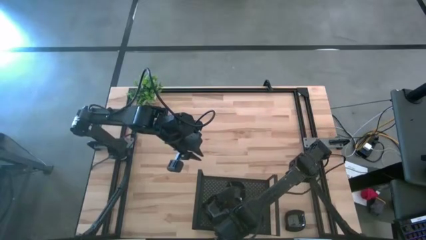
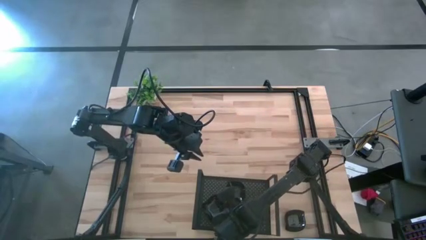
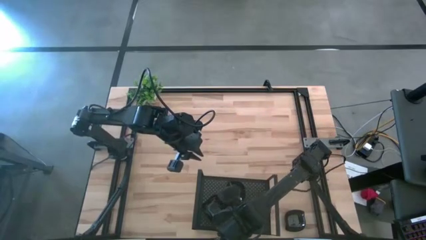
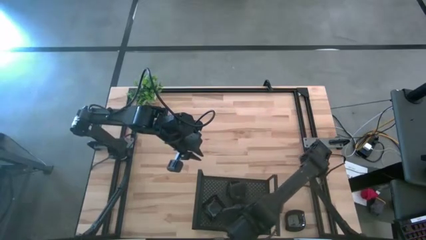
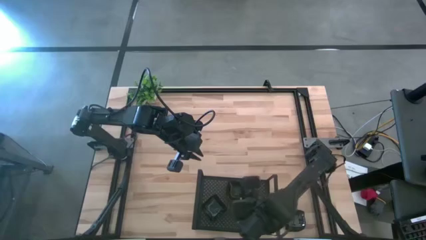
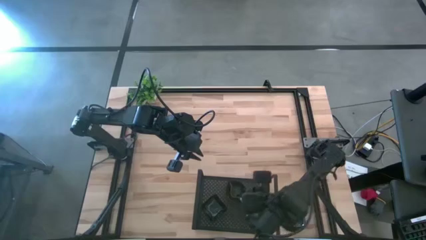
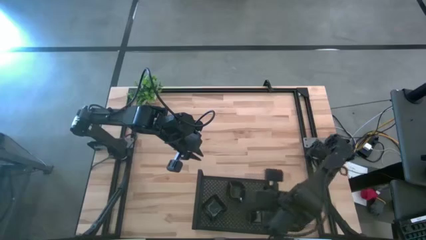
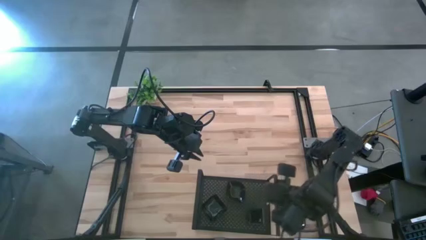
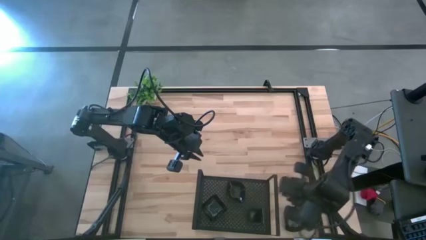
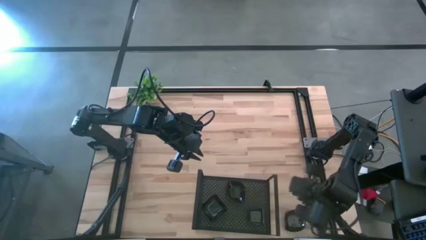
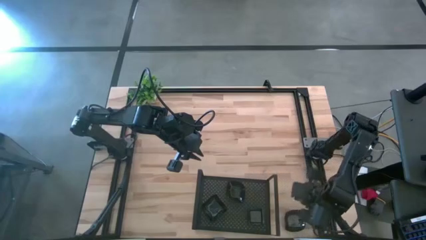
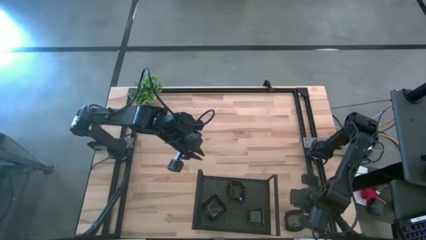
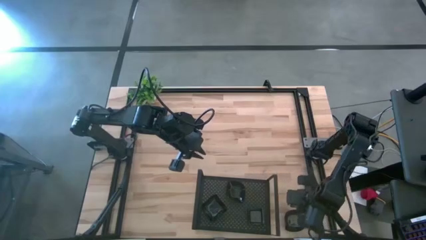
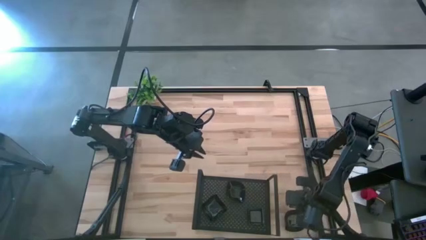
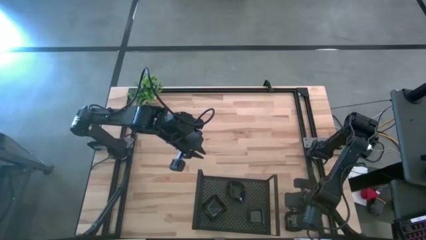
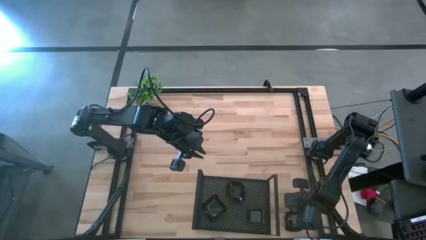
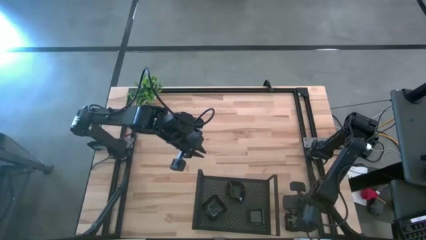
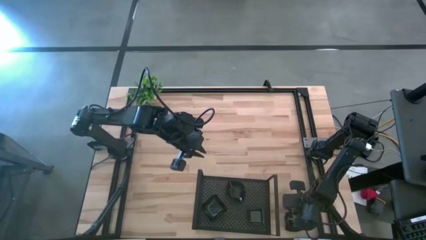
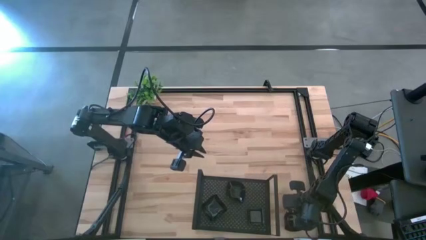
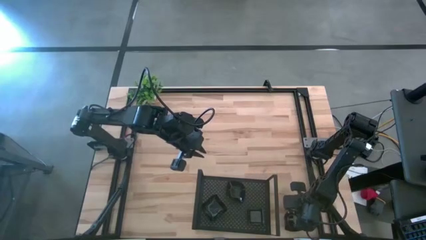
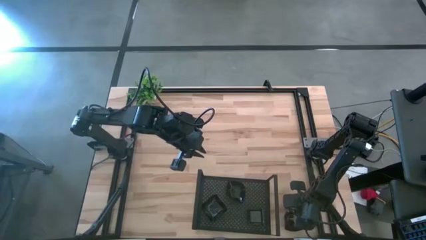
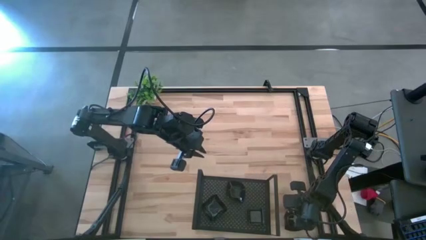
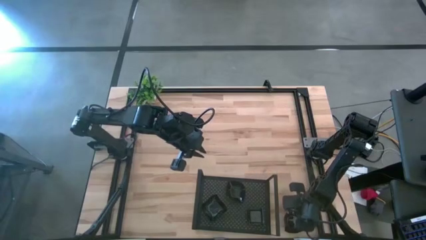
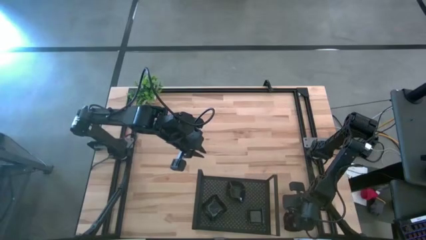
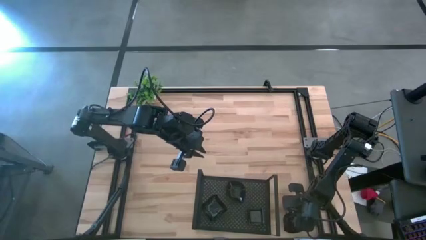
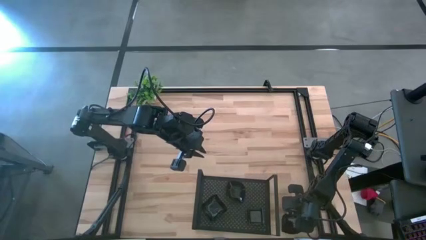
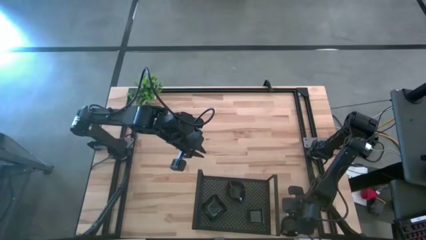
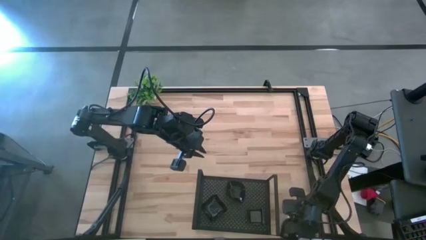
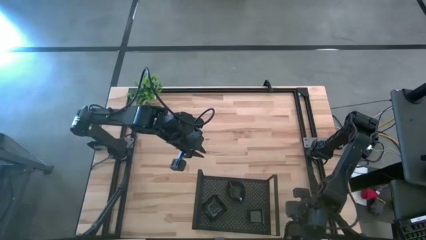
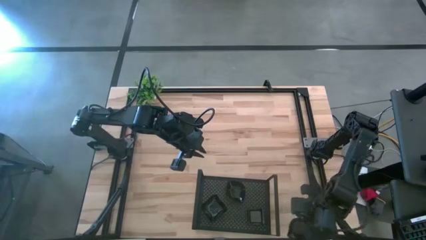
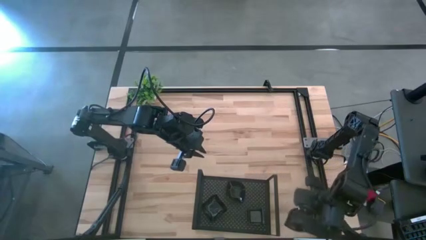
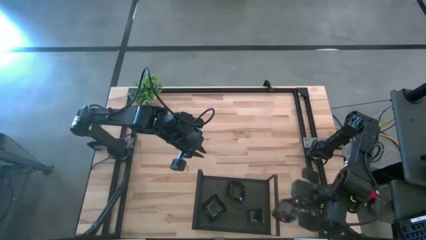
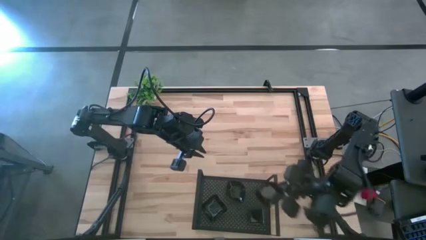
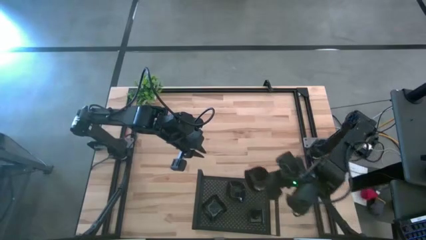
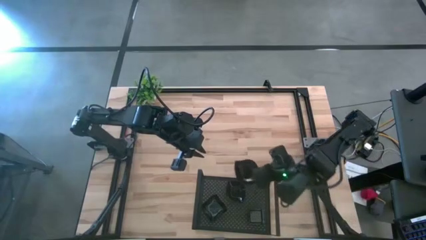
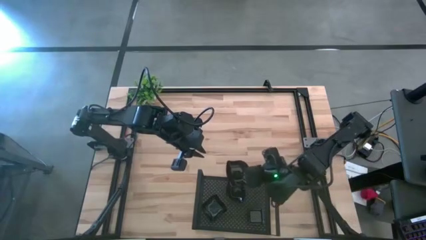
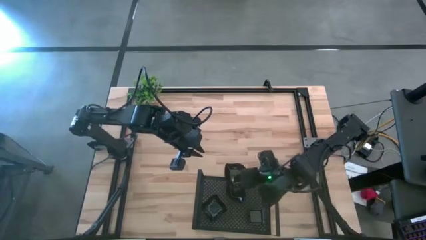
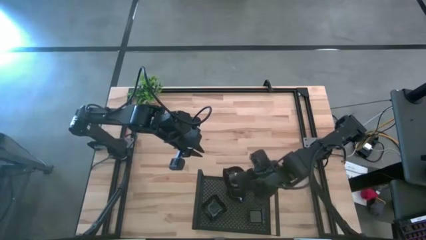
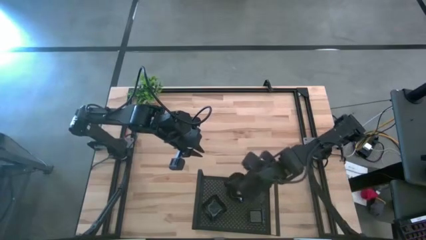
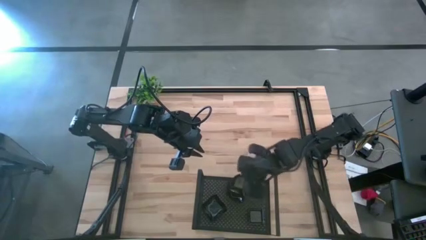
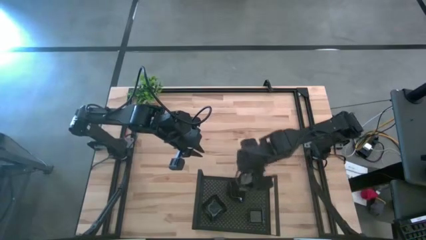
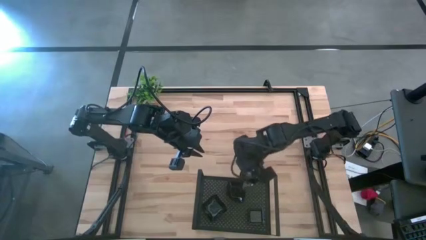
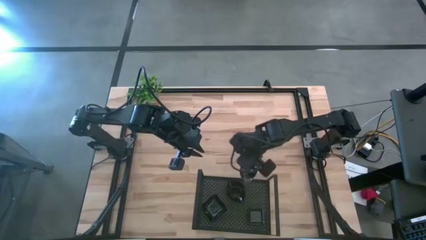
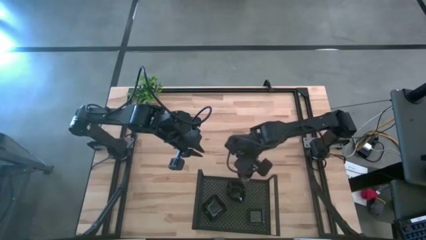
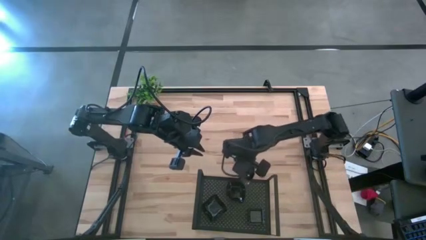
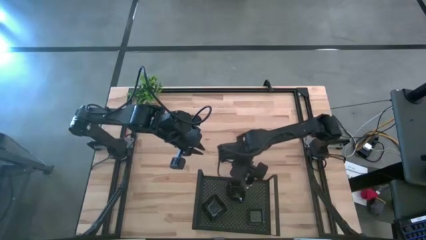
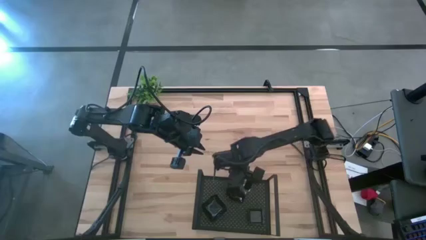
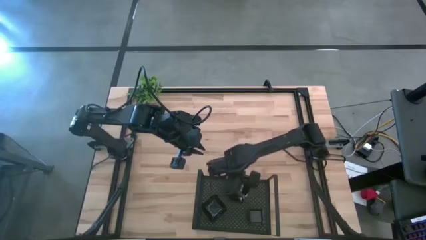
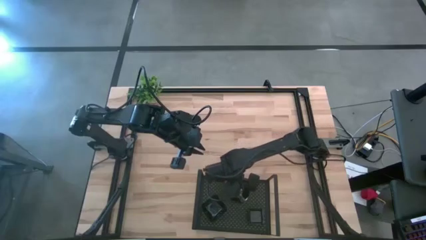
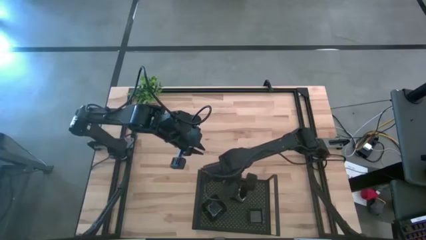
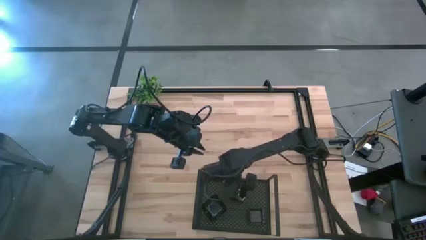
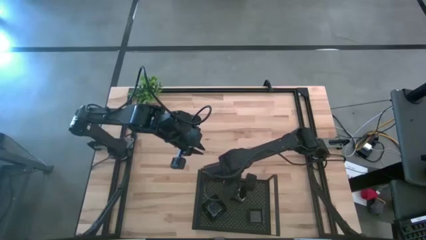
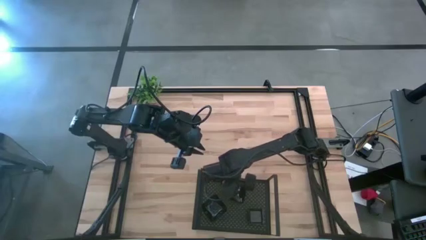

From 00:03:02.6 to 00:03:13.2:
Task: Pick & Place Mini shaped plates
Stack the leaf shaped plate on top of the other leaf shaped plates on the shelf

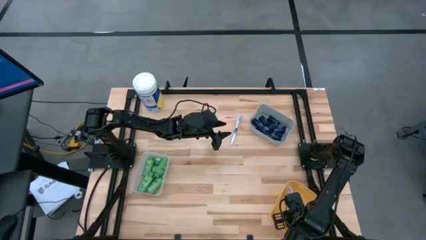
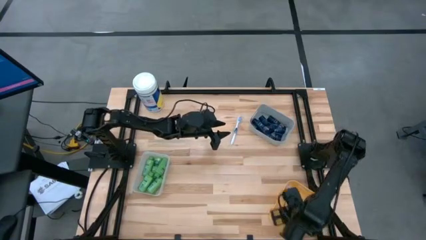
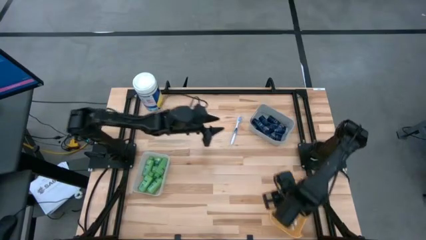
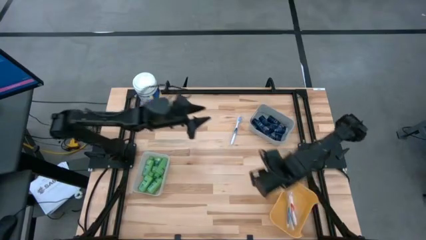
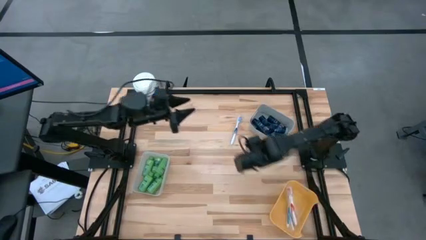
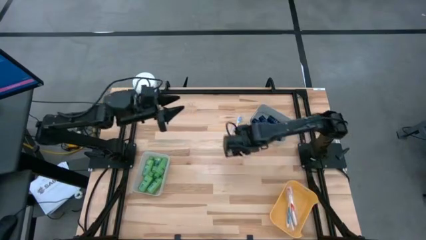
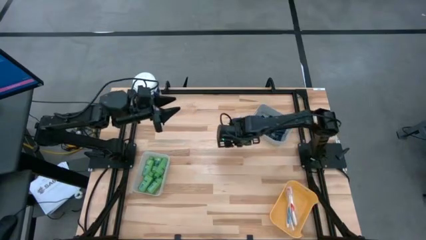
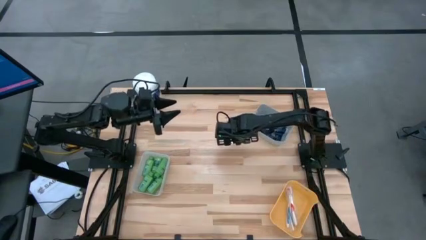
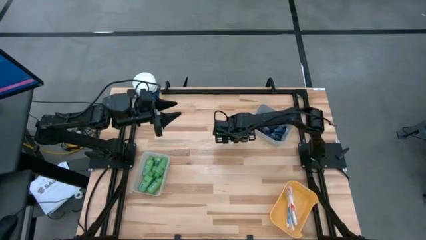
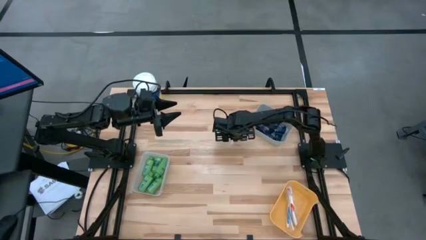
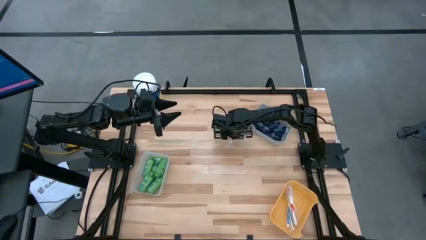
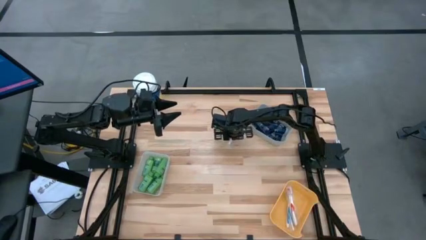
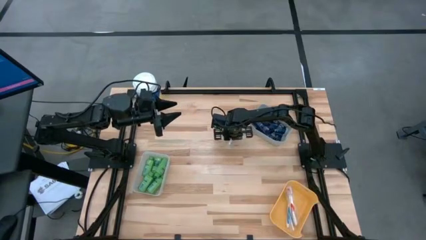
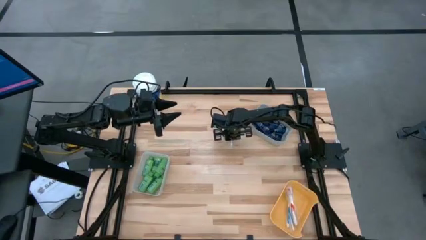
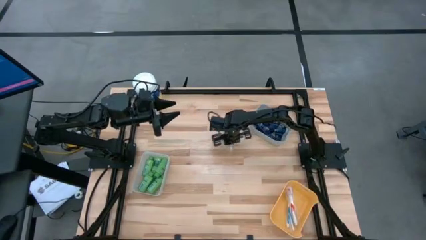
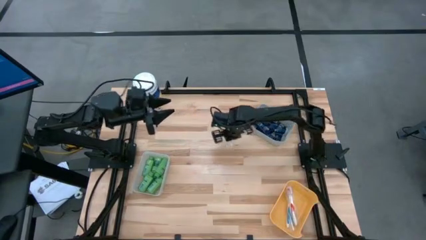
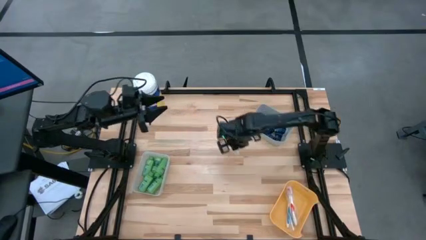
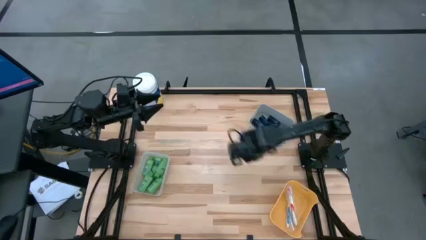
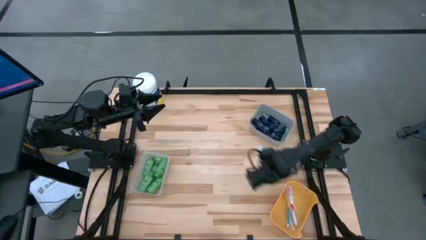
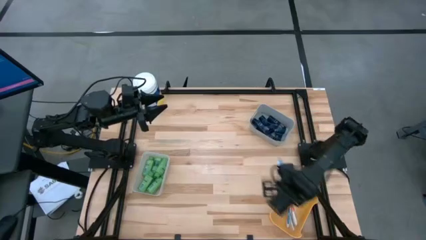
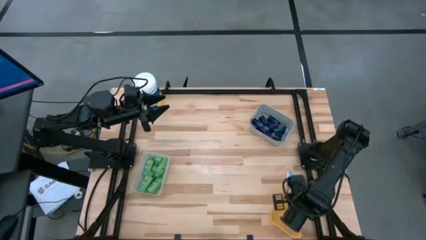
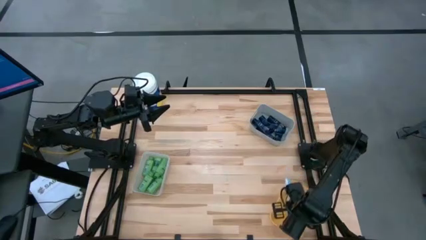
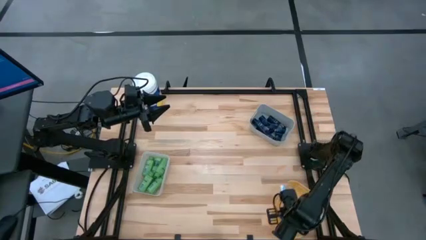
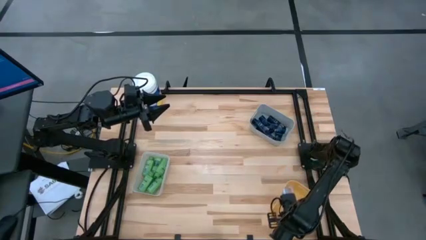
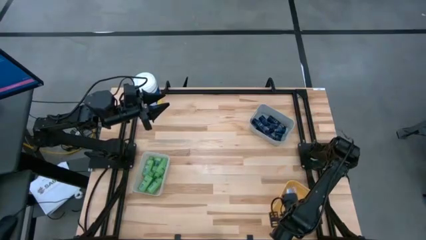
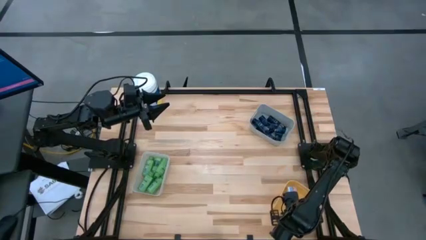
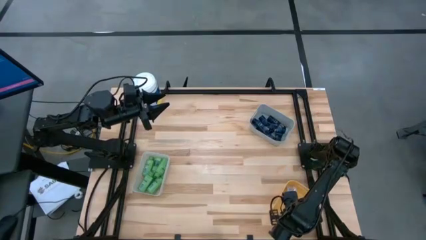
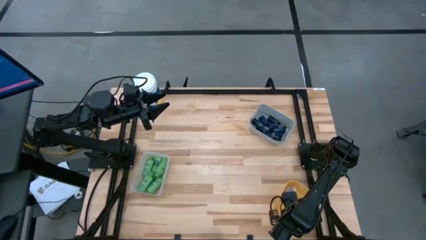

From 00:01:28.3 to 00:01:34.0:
Task: Pick & Place Travel size toiletries
Put the dark blue toothbrush into the yellow bin
